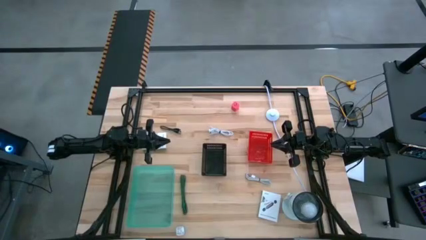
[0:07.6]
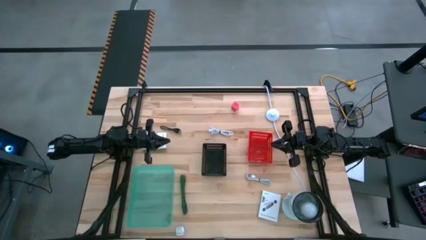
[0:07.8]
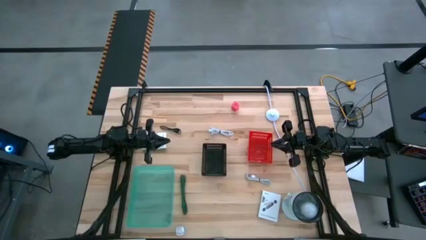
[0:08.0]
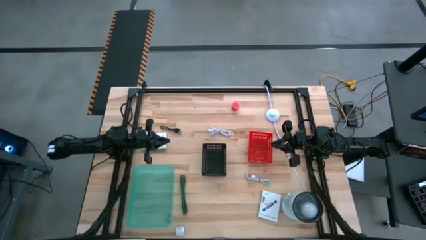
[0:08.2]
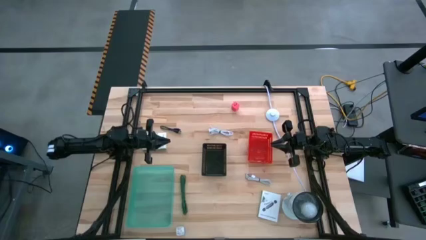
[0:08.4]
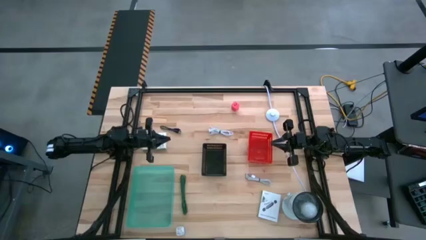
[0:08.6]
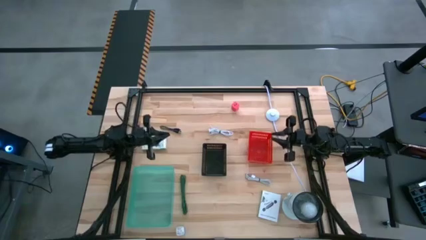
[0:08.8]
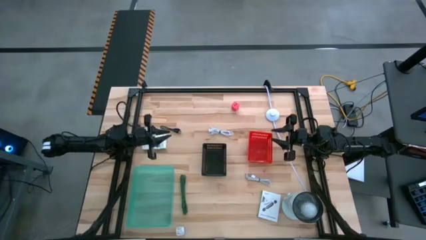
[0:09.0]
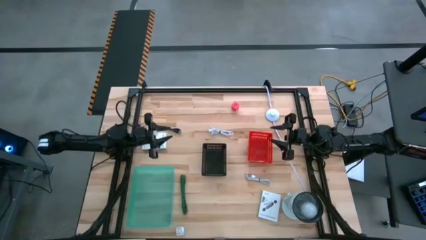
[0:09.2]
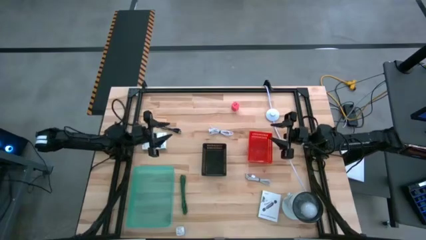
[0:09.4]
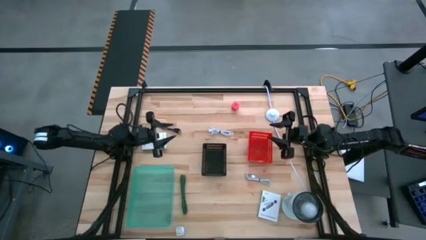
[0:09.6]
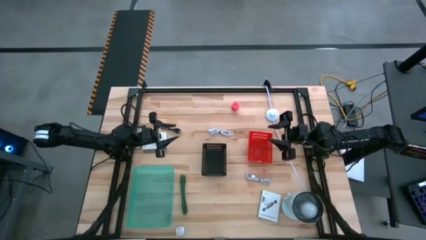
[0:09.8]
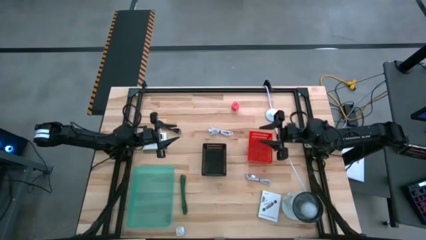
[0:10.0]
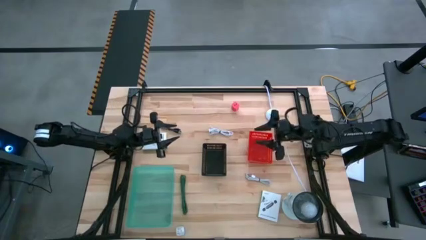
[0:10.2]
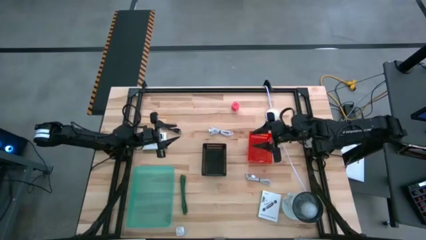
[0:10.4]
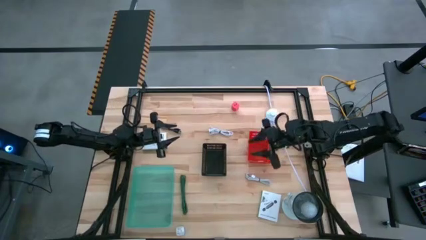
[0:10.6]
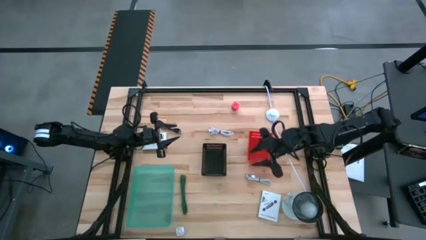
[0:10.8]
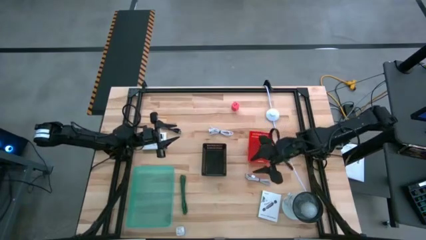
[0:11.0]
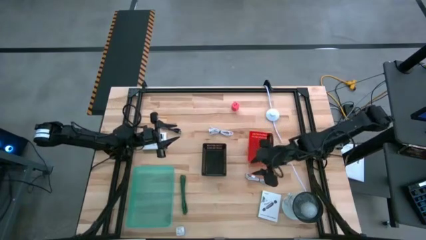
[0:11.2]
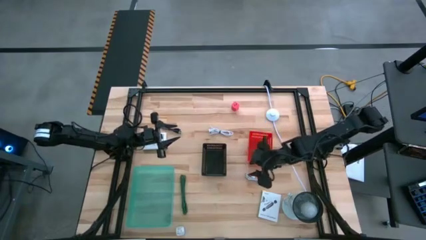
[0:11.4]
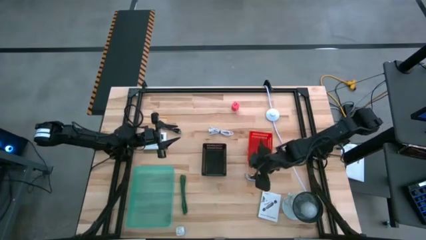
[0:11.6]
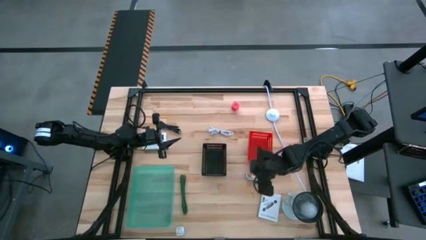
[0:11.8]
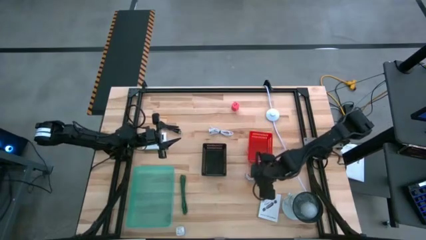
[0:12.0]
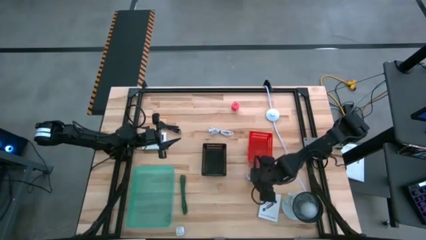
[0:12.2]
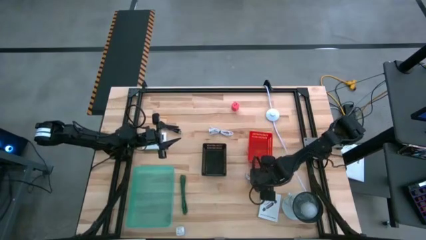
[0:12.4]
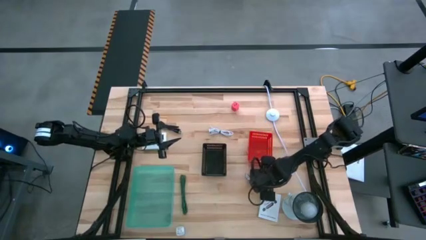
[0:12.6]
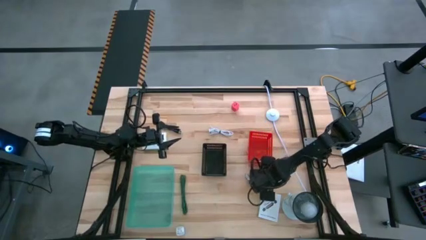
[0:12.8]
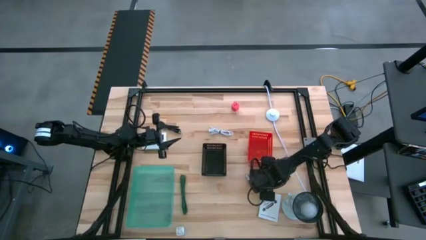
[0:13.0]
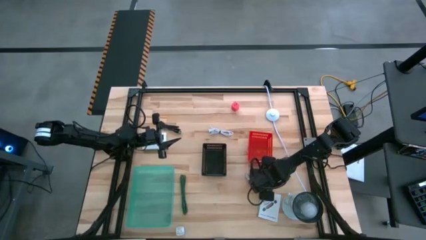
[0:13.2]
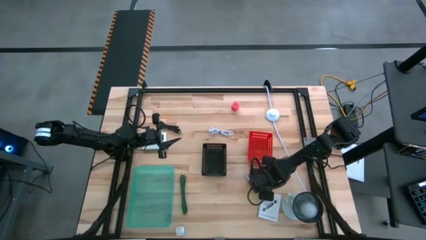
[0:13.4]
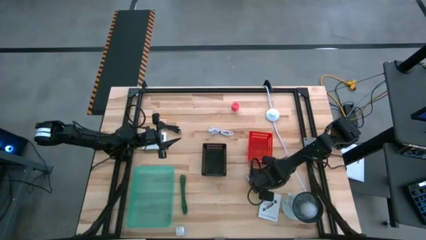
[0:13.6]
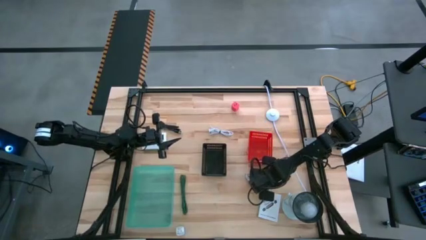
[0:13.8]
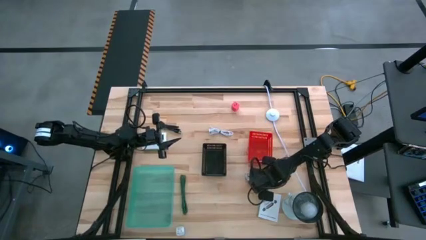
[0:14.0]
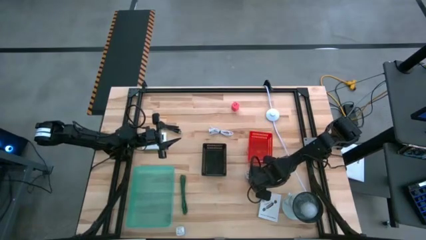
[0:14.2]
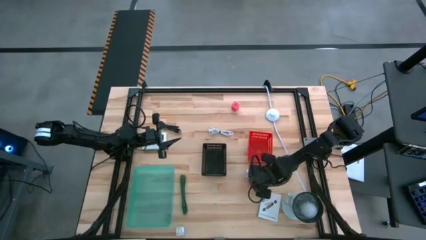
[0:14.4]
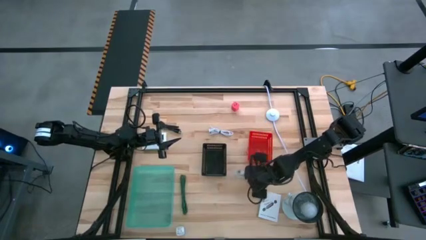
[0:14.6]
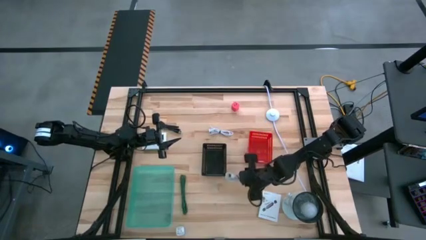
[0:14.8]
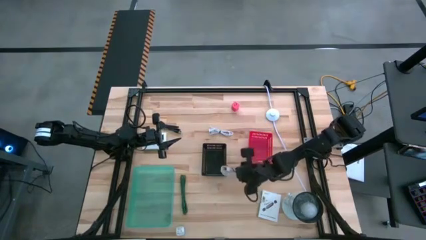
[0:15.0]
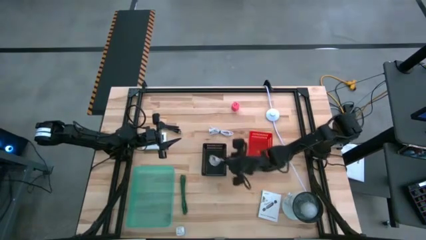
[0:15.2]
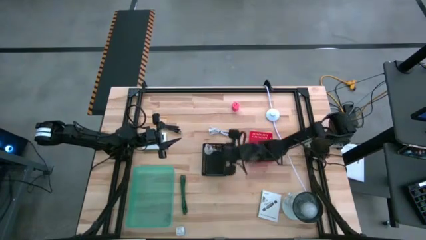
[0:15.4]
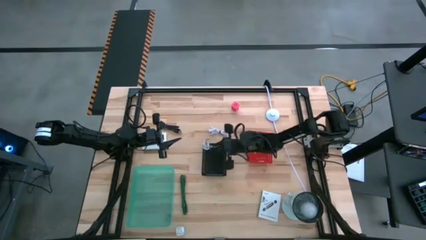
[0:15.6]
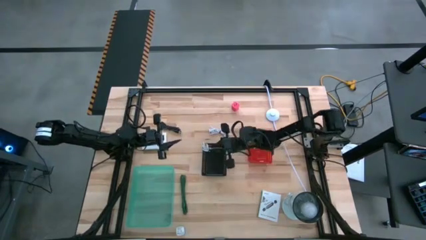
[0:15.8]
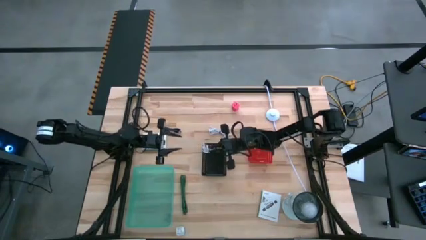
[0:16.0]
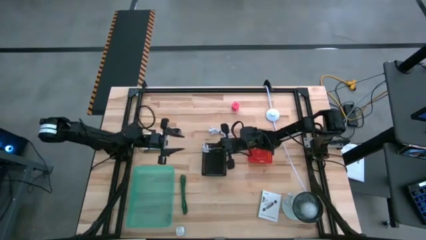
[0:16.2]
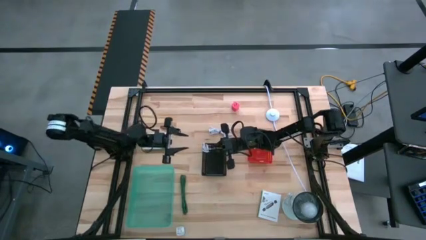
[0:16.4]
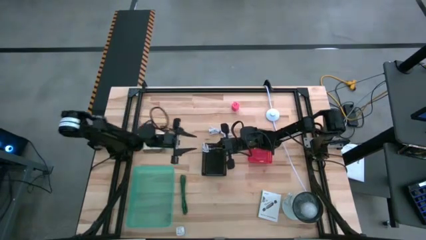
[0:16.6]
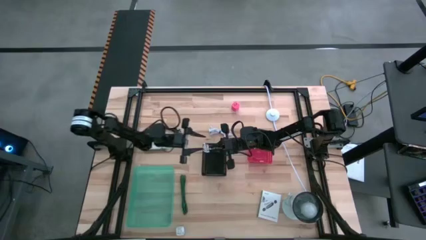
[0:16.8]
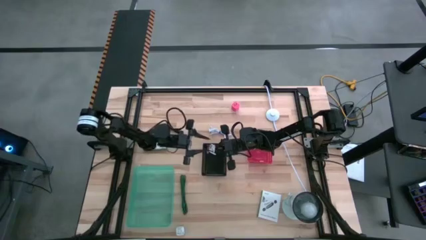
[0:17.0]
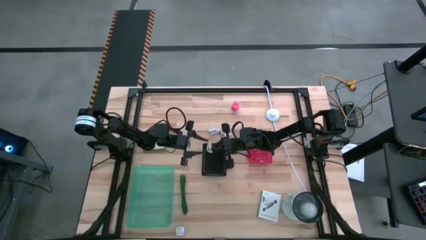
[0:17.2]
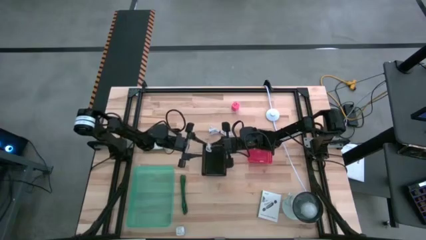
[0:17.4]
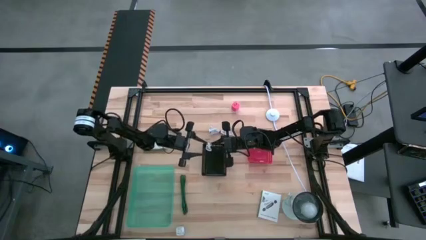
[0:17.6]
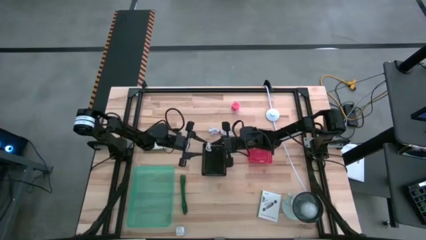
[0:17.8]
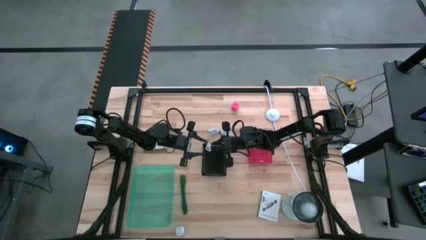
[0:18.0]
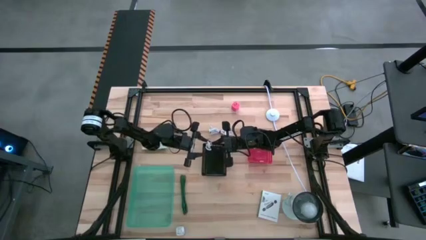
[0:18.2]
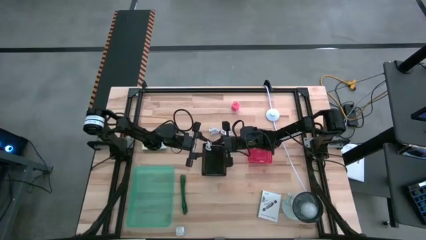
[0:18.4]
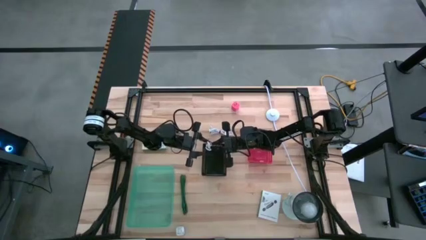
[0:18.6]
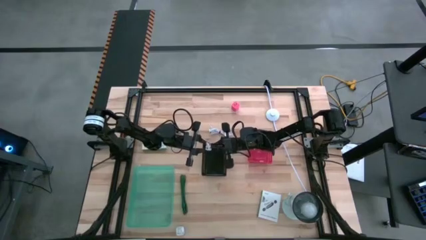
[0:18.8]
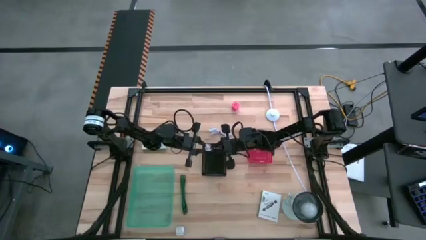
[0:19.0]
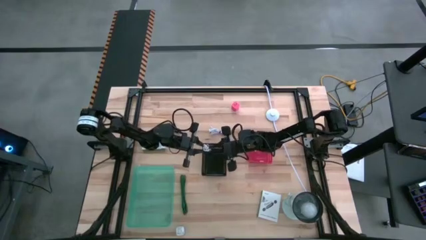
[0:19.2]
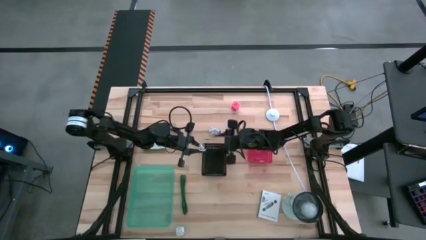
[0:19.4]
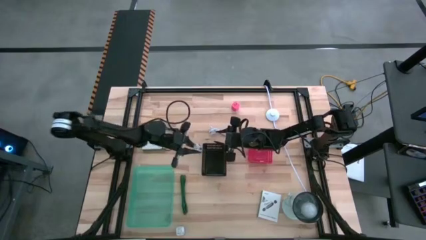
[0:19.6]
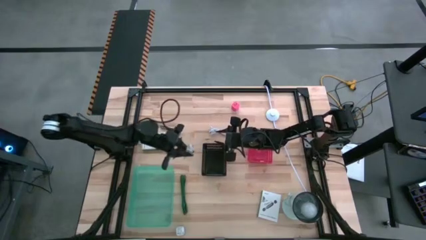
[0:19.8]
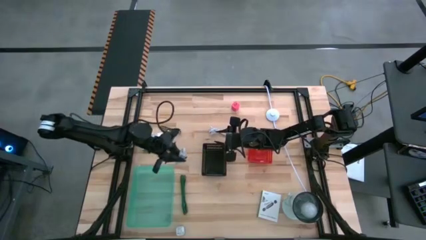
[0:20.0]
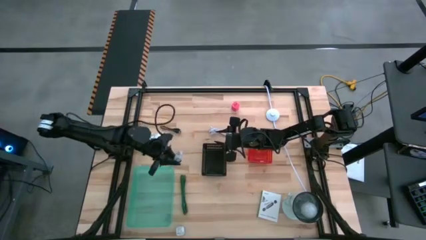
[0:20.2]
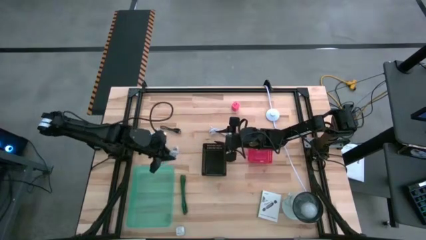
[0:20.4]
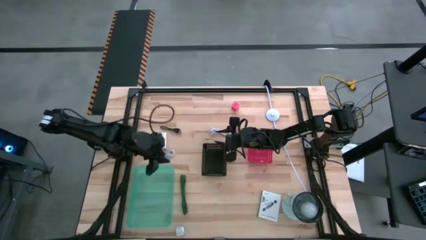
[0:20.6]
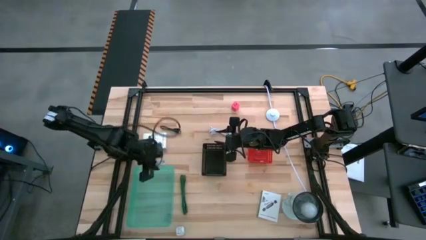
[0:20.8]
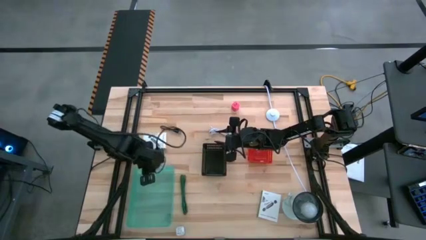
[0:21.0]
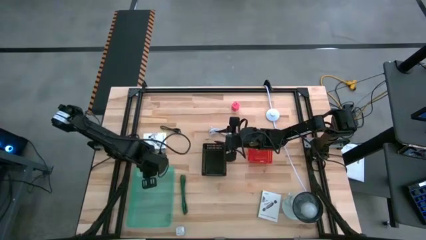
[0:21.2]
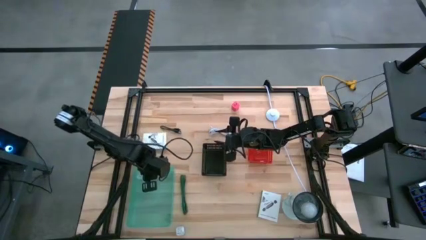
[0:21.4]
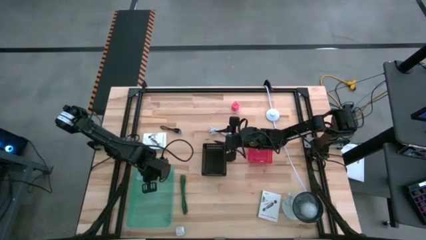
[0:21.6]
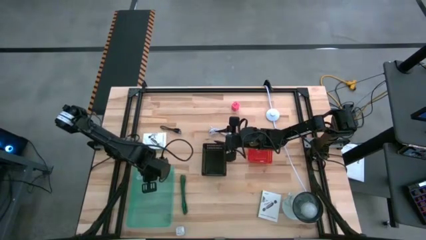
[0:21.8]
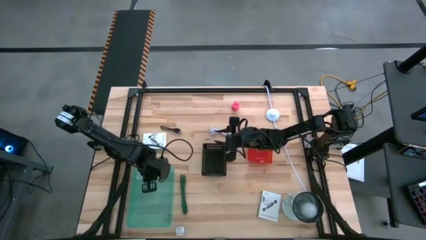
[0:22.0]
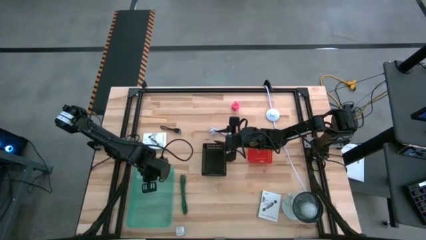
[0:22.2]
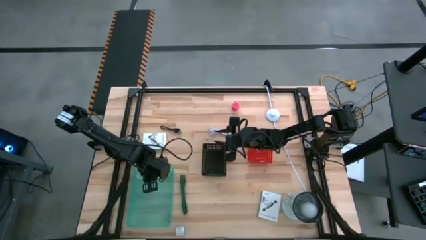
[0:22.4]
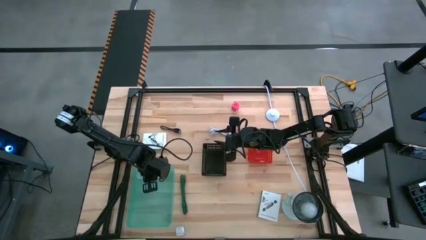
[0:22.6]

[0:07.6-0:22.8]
Task: Pick and place items into bin
Put the bottom white charger cable into the green bin
